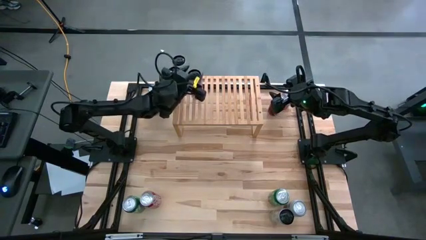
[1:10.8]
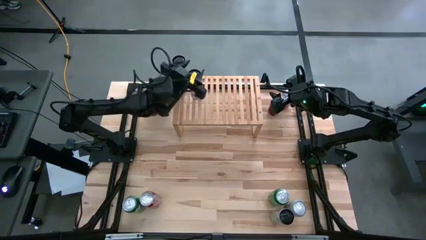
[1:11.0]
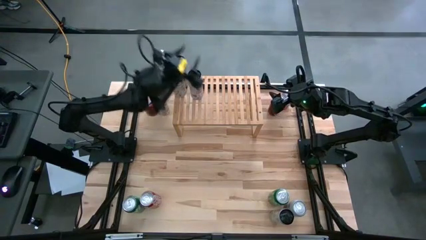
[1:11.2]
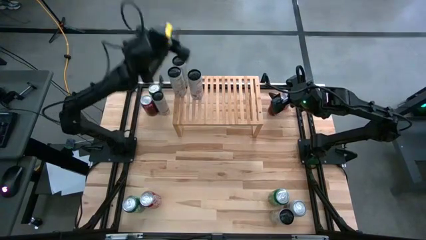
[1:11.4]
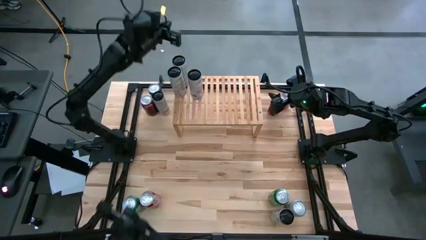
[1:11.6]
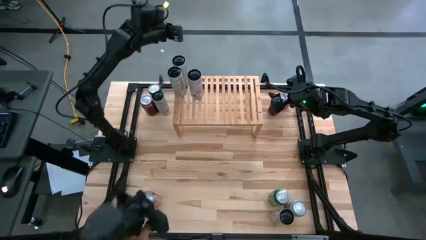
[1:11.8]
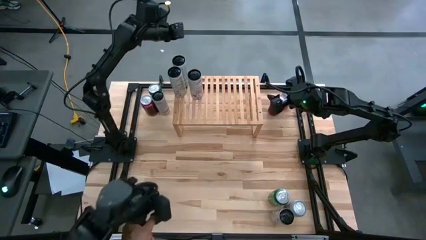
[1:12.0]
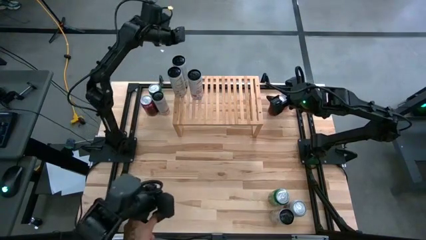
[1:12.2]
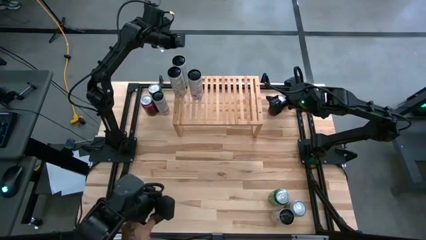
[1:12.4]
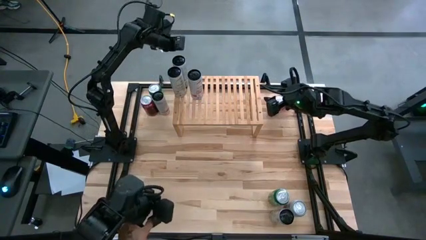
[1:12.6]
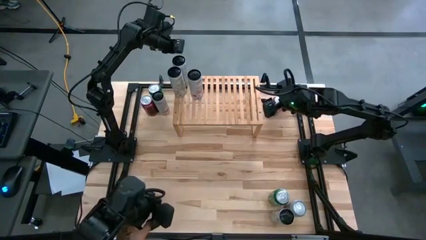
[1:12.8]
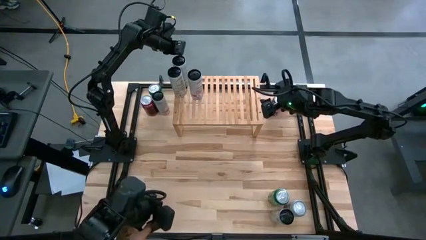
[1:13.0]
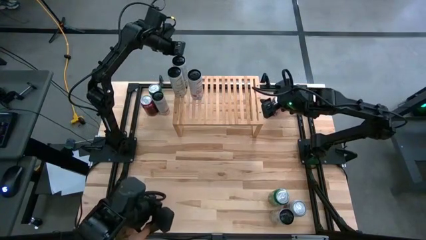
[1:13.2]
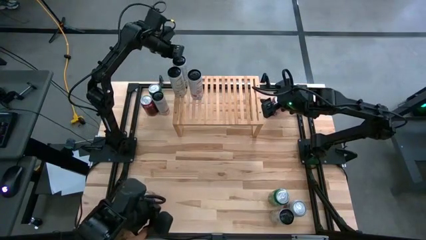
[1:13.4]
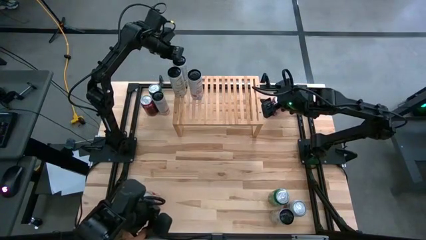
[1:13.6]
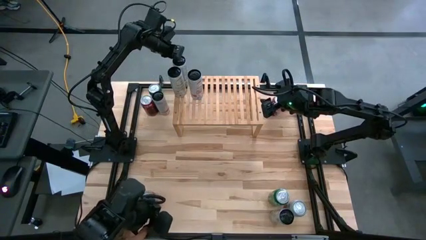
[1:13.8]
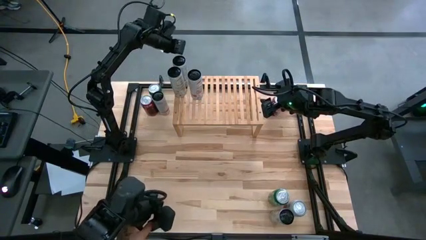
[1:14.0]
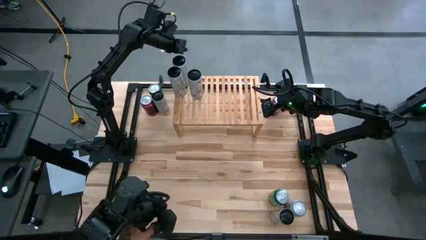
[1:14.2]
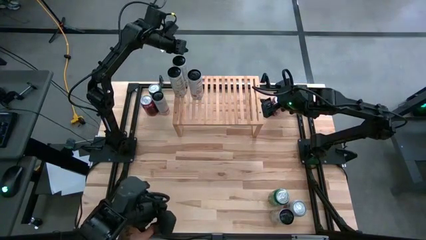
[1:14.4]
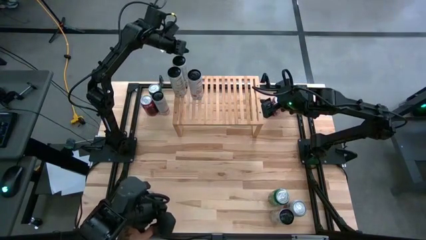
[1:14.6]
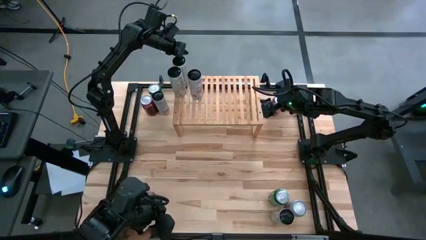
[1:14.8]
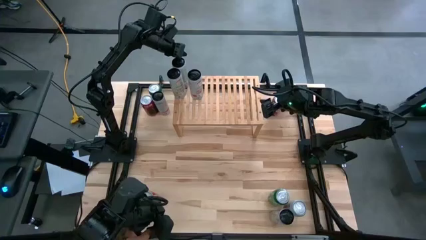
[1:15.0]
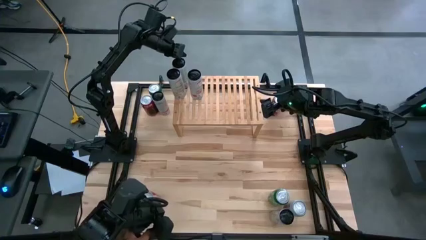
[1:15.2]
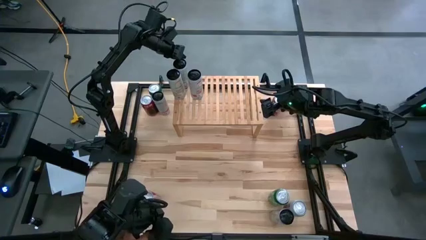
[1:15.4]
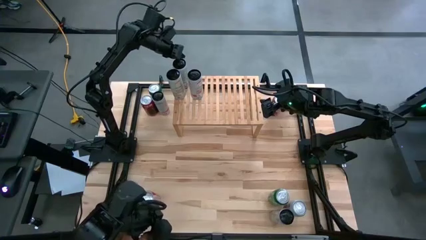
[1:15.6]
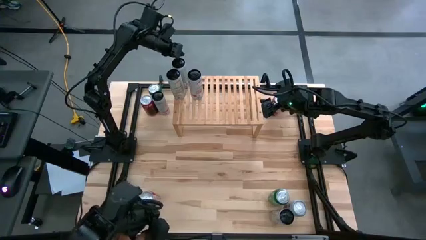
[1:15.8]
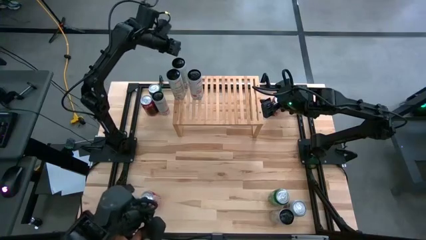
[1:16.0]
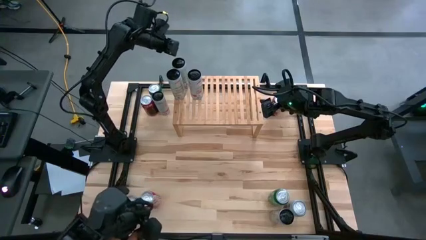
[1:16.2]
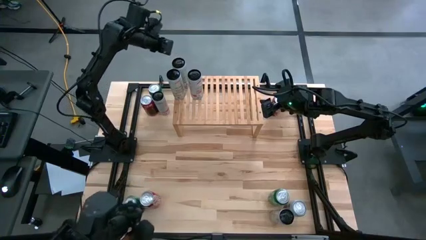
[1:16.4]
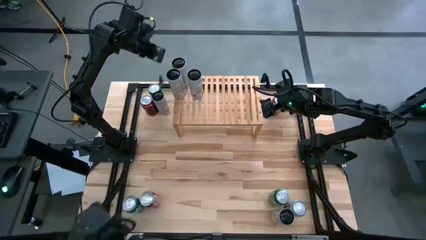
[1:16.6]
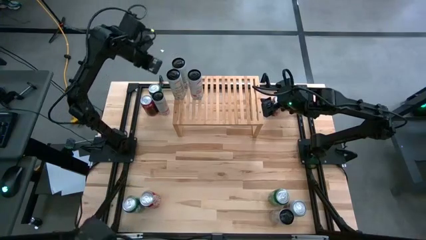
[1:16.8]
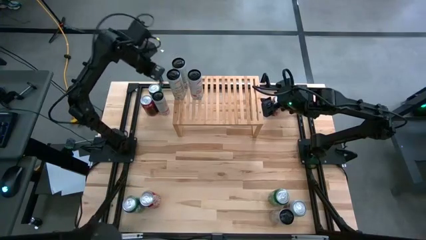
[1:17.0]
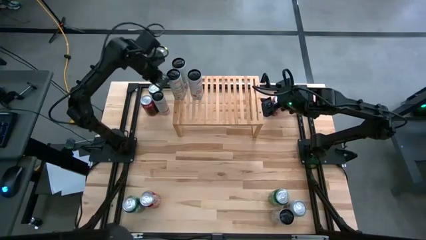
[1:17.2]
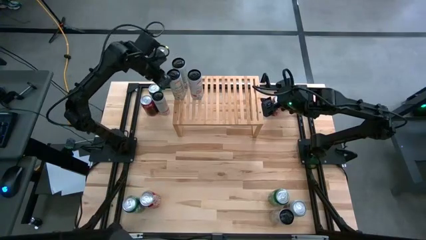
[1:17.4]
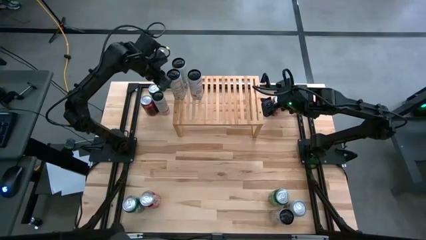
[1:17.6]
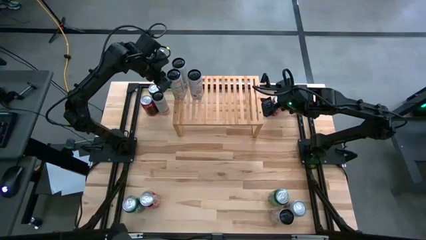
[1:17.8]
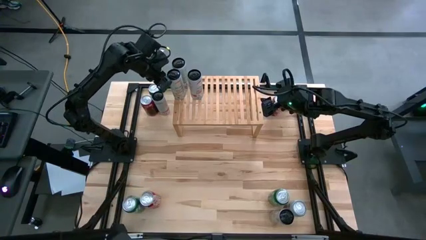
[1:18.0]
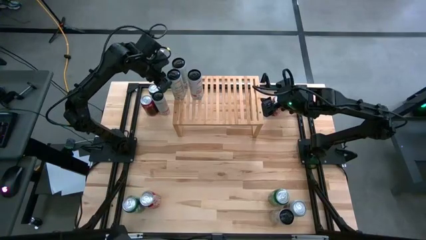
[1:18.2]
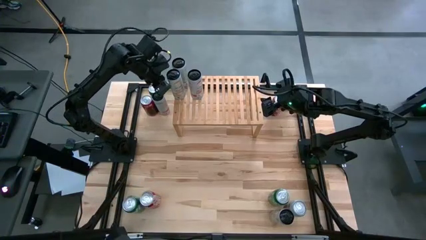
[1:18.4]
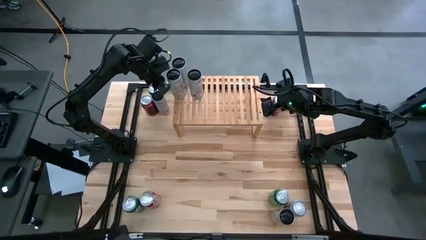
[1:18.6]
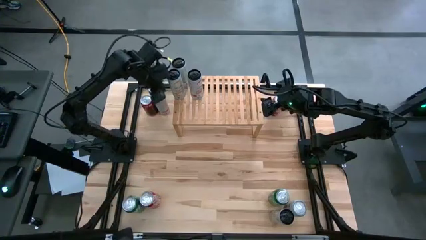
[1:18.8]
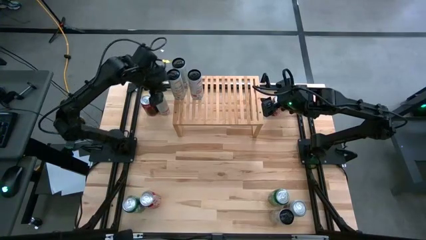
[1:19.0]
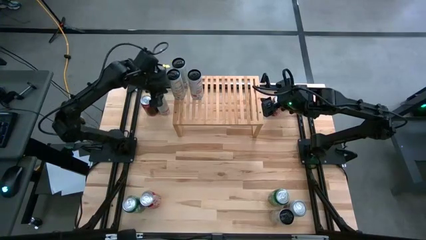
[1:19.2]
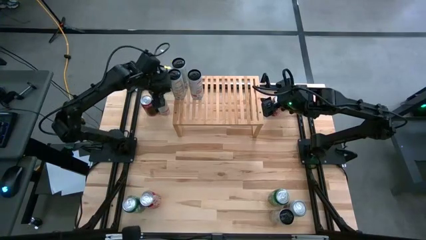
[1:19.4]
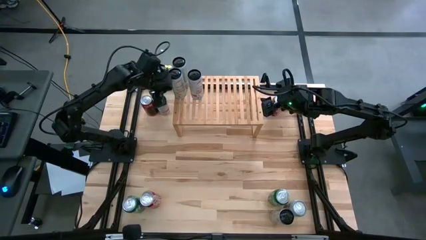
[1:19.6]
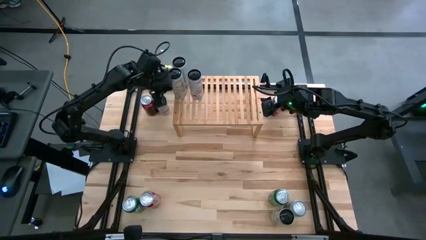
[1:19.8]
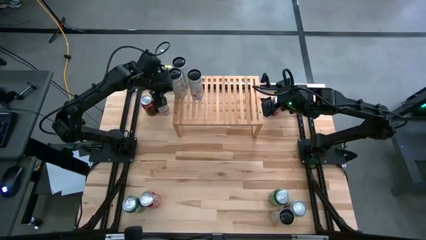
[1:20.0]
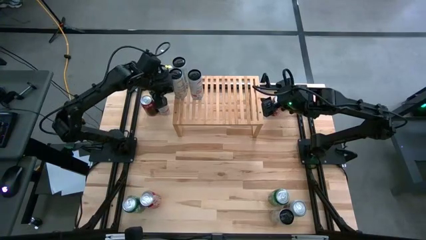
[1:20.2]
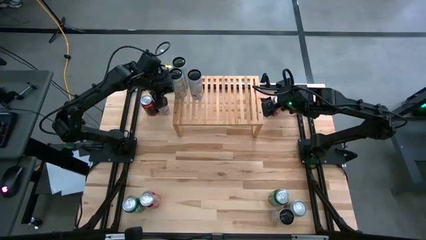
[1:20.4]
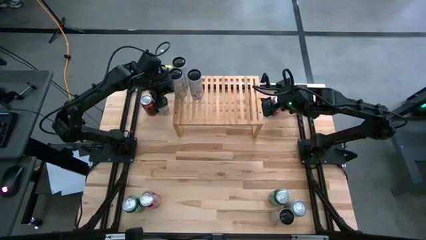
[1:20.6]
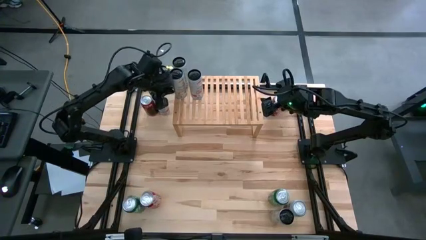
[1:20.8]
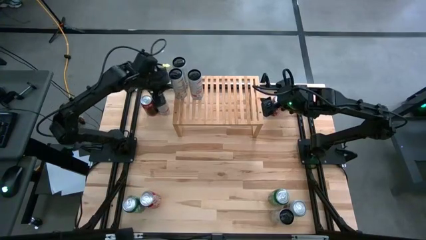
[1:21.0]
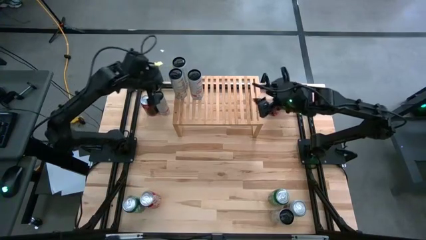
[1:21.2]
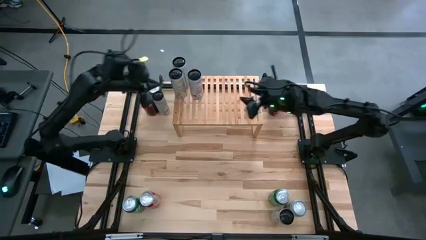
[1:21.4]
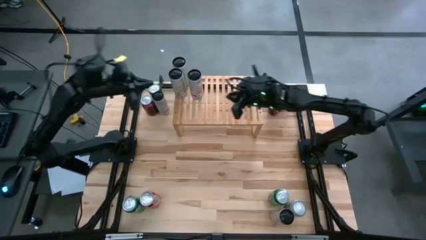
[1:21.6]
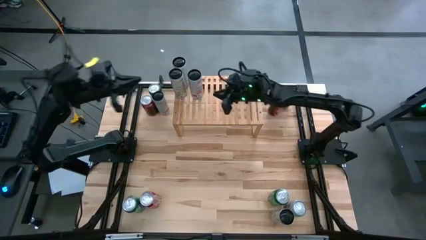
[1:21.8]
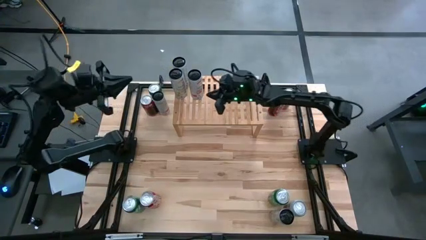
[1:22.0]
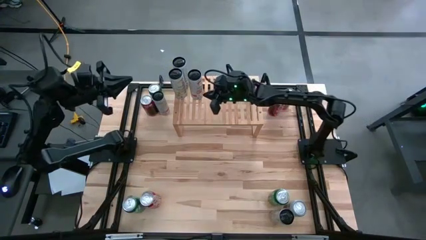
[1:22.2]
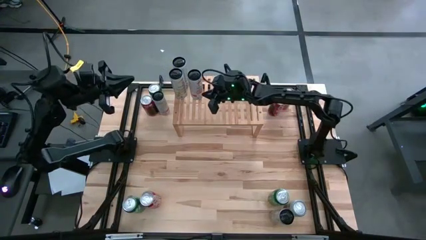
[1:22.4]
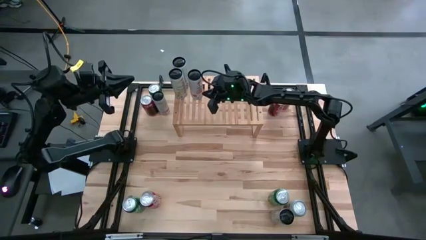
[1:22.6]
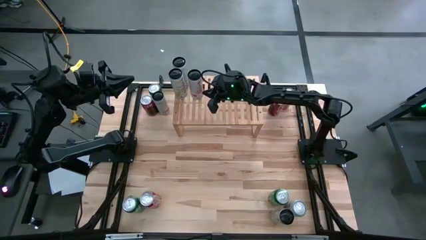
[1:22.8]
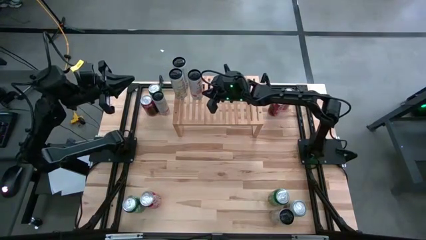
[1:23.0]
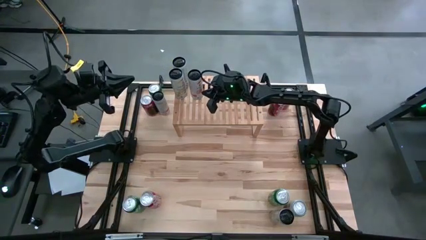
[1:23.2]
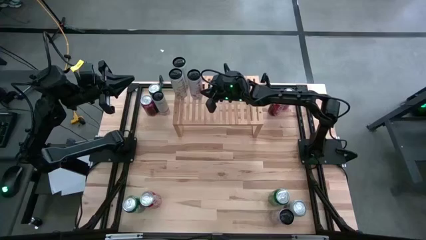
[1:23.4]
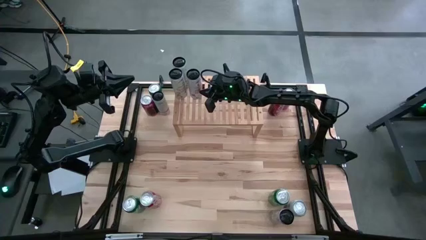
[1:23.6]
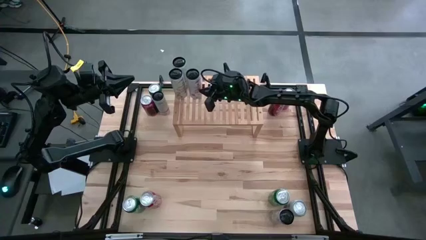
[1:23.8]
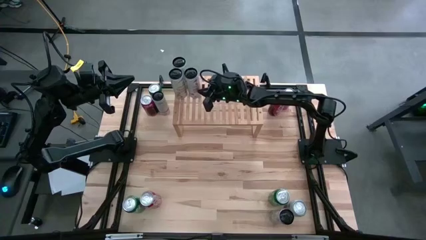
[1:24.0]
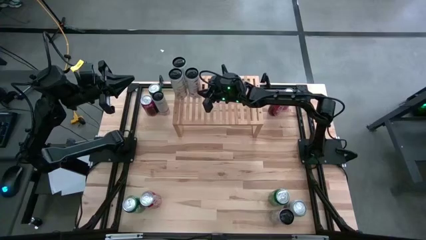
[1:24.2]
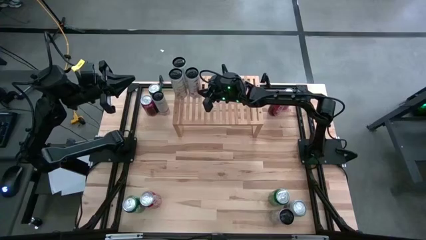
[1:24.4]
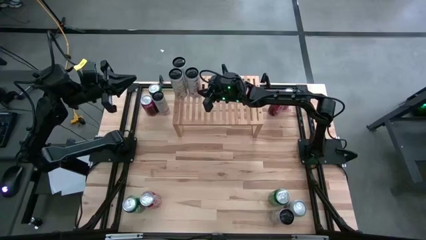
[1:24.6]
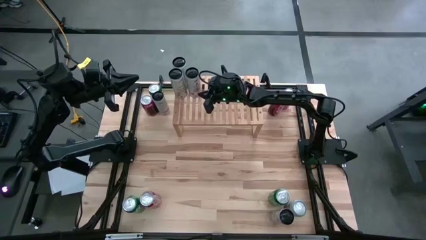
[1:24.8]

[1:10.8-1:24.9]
Task: Place canned beverage on shelf
Adjust the soda cans on the shelf
